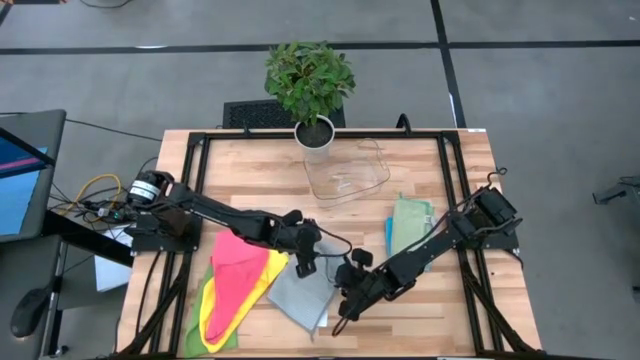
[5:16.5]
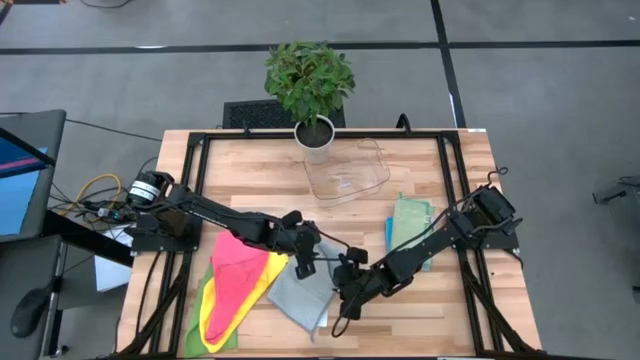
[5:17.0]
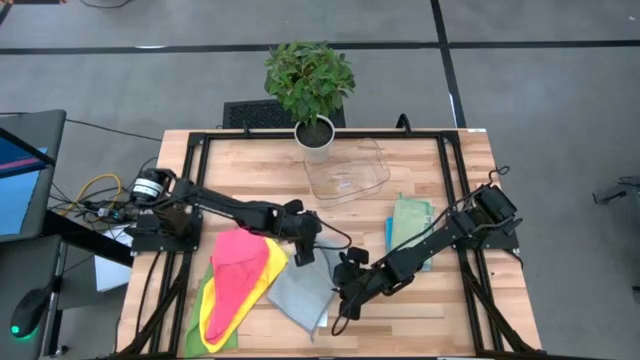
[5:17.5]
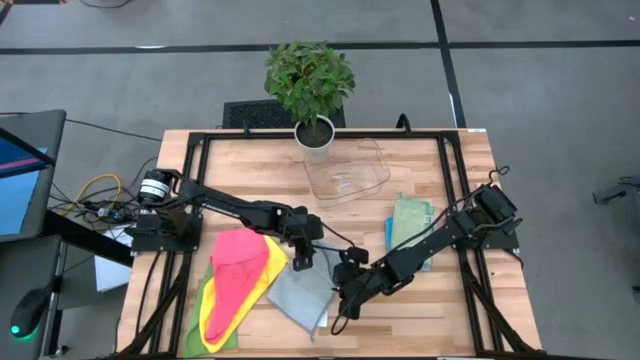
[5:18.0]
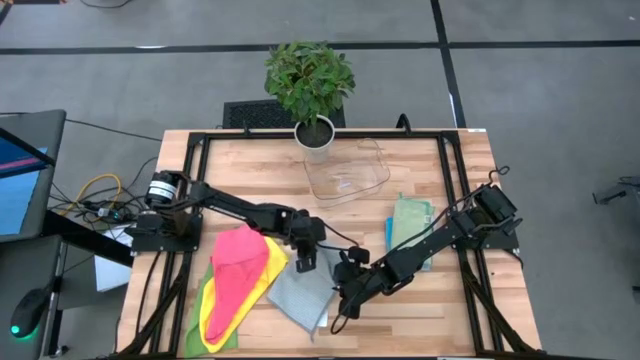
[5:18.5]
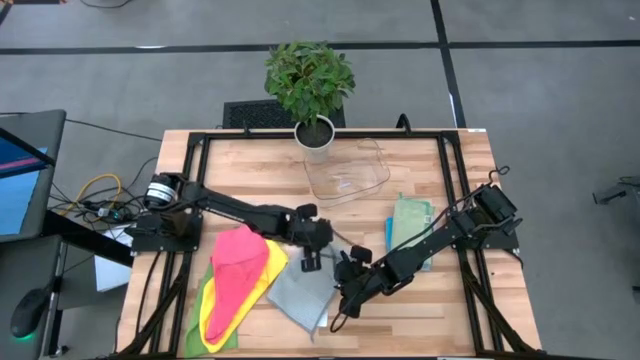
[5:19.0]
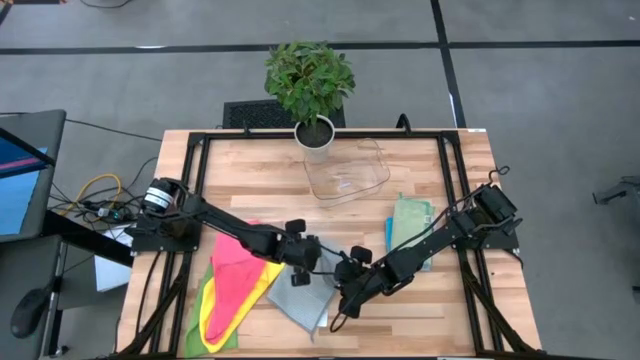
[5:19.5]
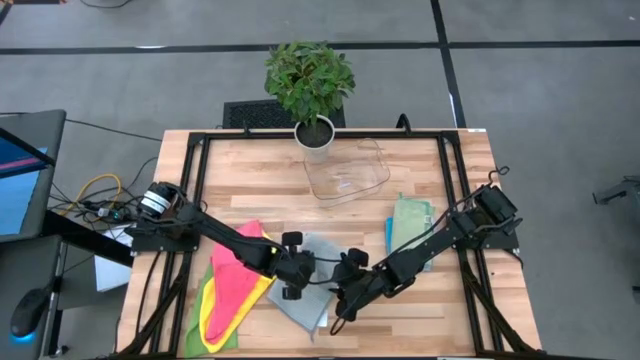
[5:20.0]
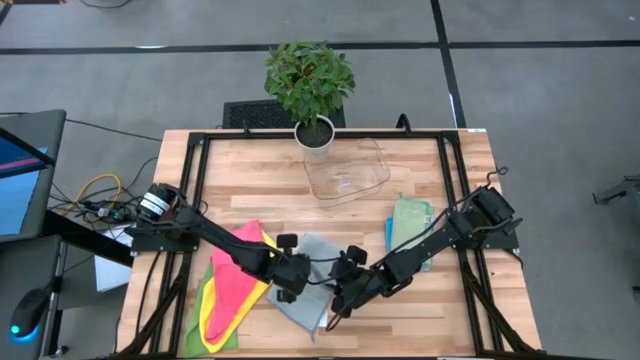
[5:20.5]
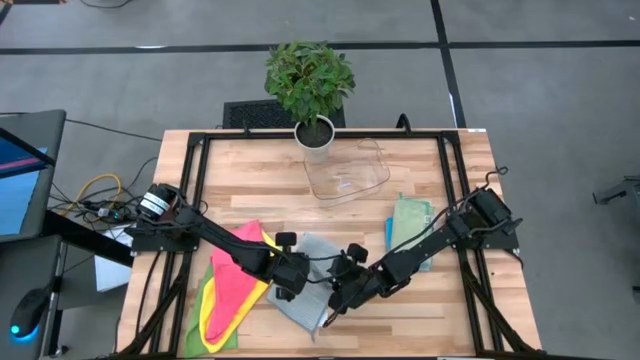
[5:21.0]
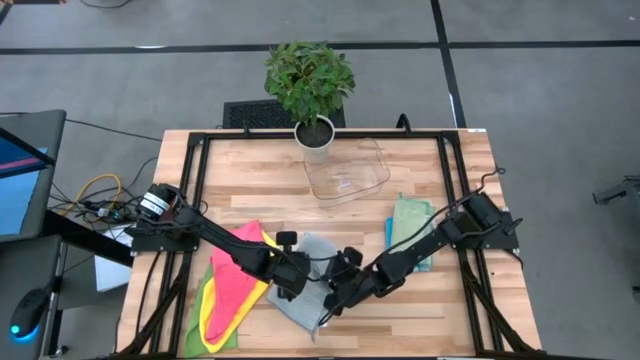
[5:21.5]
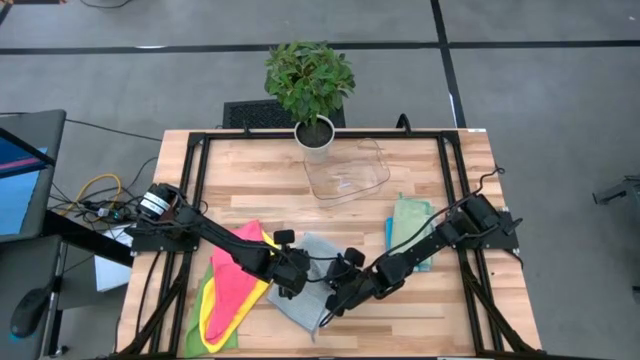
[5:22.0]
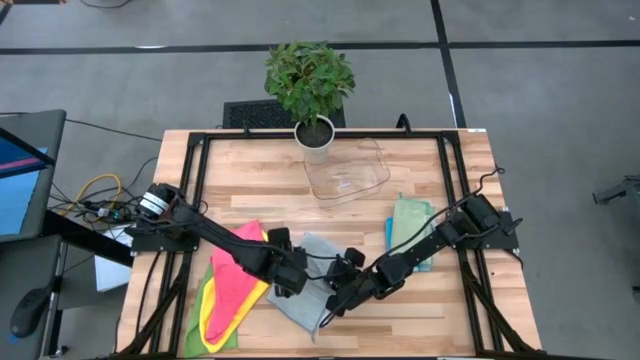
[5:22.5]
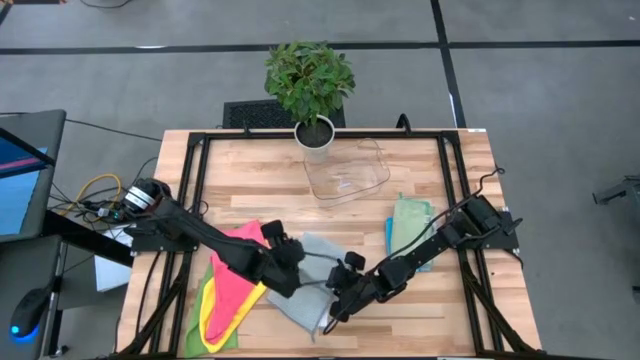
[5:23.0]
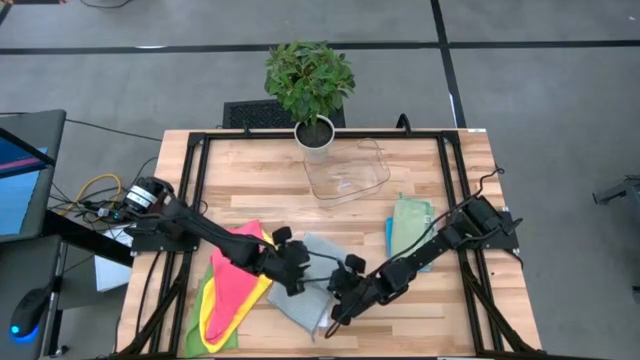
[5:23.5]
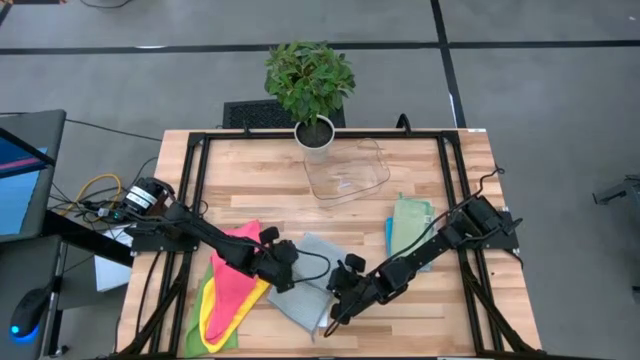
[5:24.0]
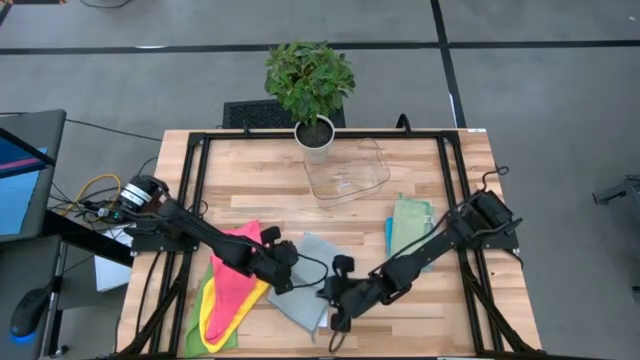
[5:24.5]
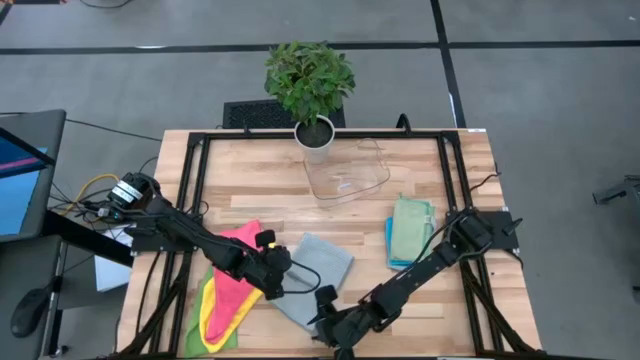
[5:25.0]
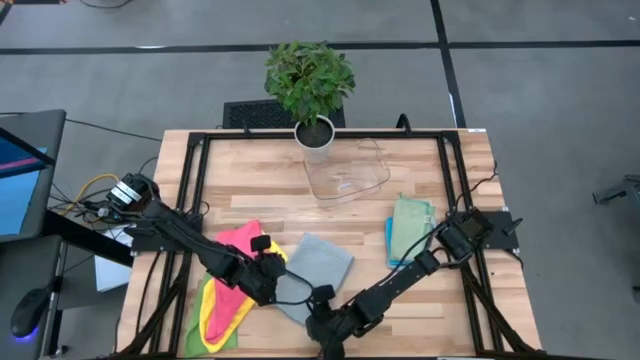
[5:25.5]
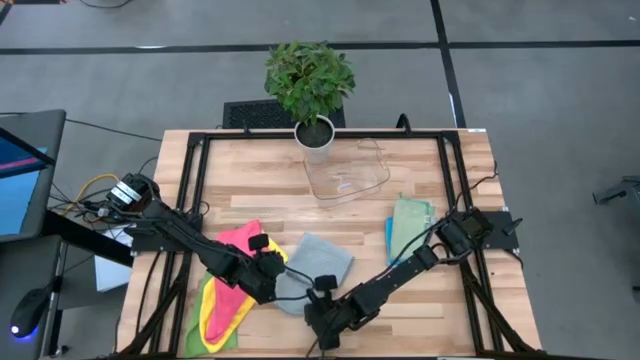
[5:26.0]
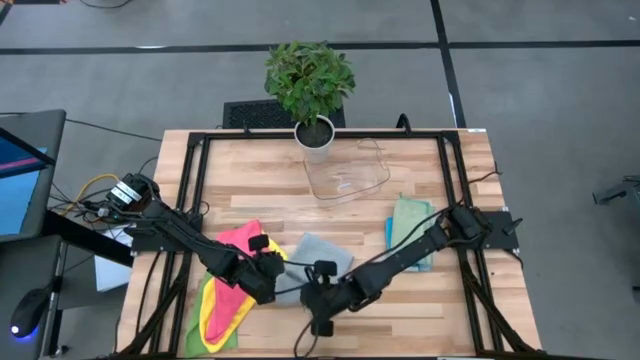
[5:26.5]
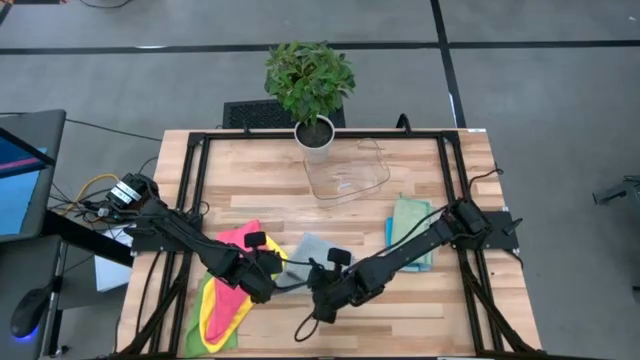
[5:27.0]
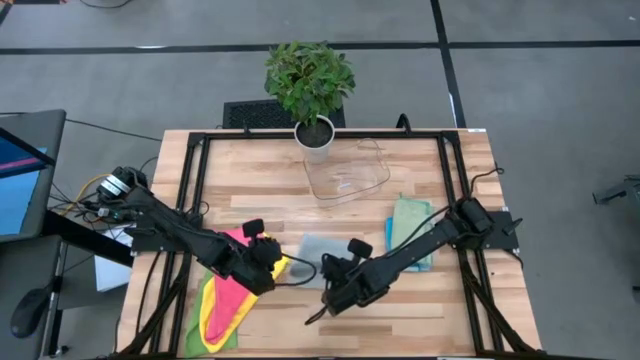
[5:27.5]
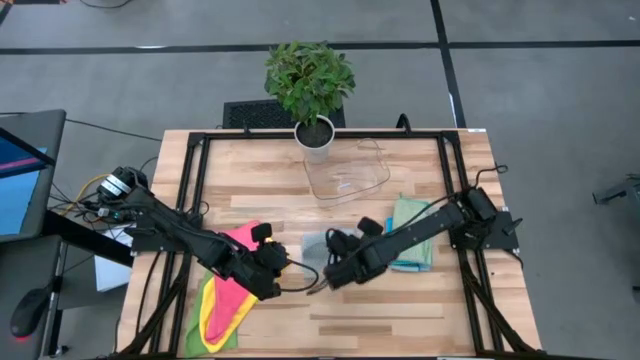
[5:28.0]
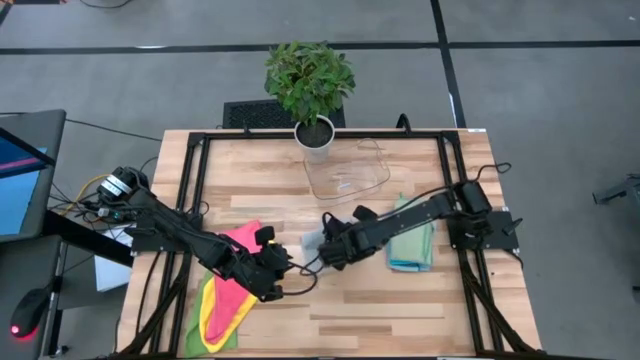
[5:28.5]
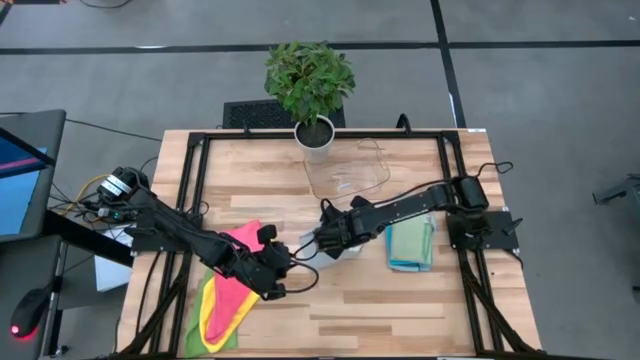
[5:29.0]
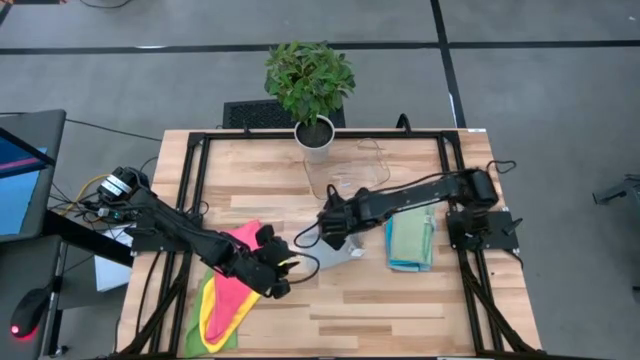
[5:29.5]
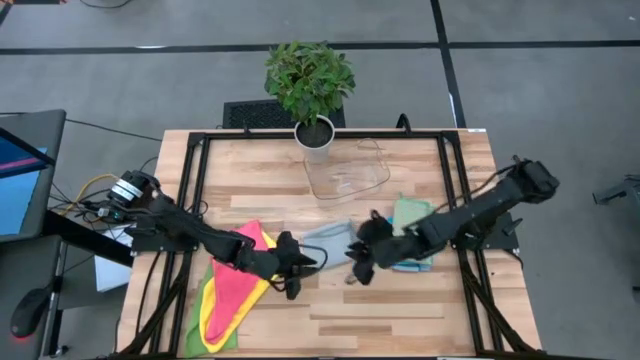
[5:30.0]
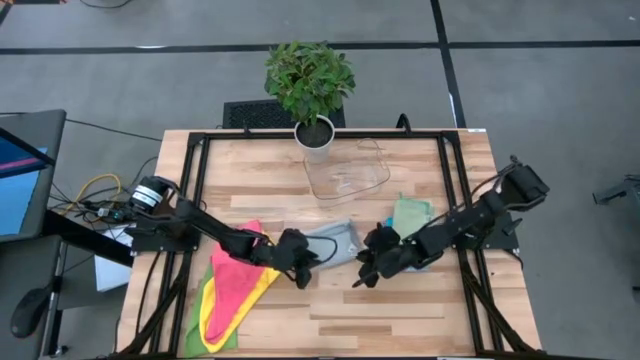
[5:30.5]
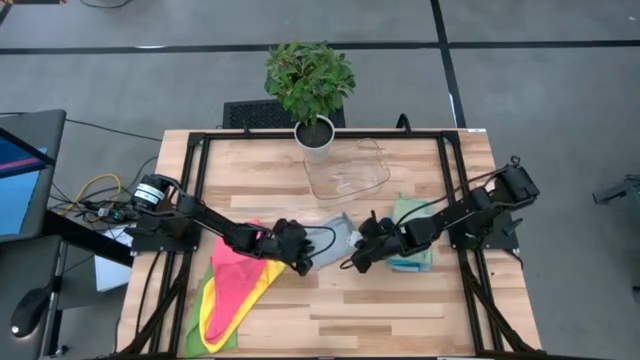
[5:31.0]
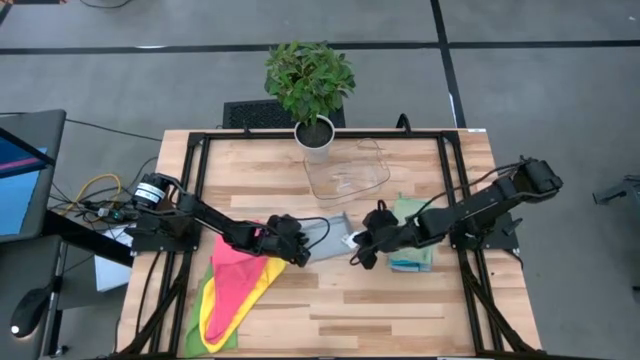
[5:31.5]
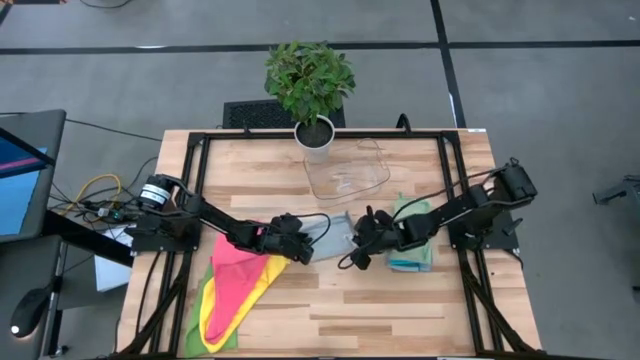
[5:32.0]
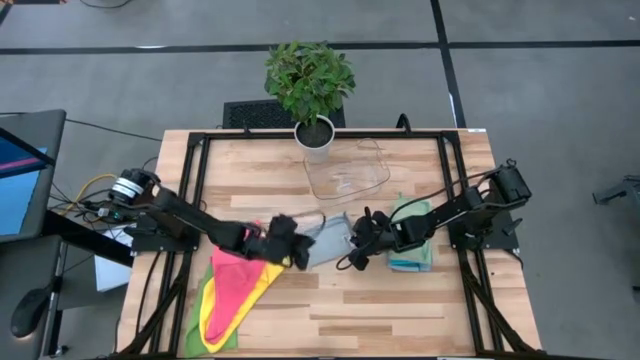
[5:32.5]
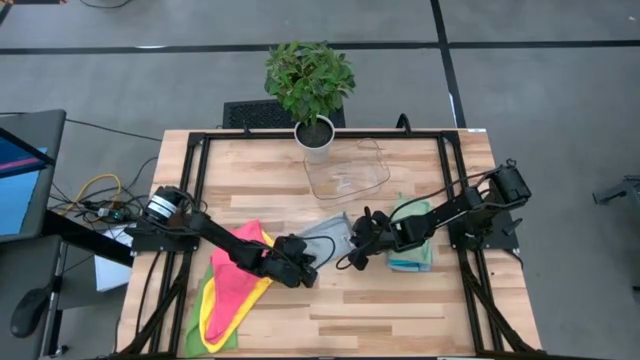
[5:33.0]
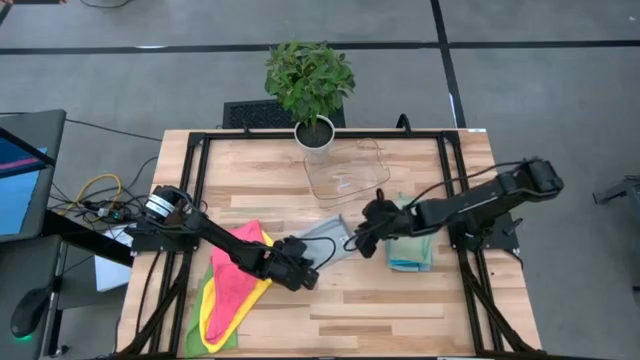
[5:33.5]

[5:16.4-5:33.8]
Task: Fold microfiber towels
Fold the gray microfiber cloth
